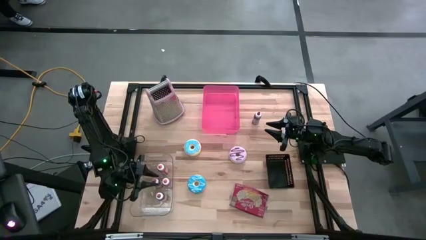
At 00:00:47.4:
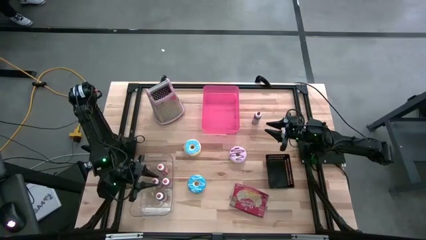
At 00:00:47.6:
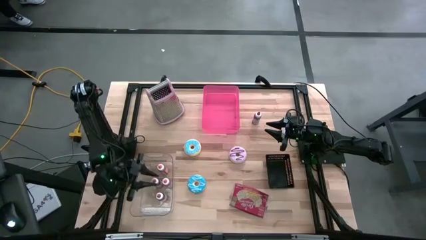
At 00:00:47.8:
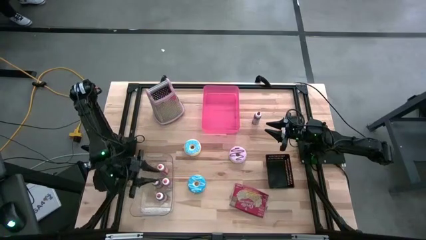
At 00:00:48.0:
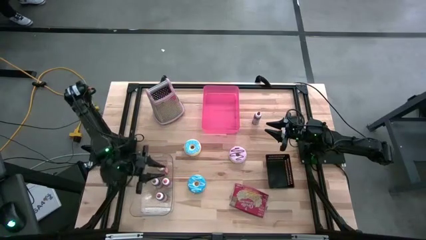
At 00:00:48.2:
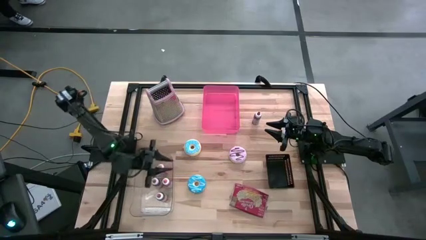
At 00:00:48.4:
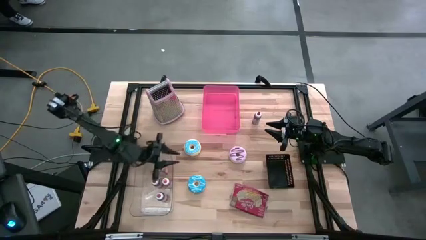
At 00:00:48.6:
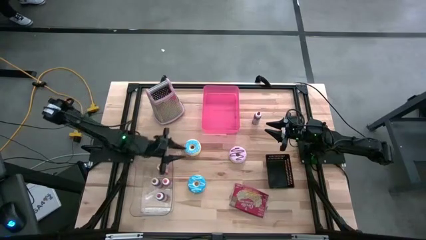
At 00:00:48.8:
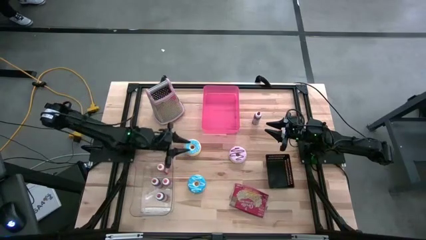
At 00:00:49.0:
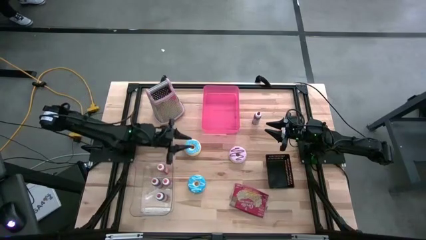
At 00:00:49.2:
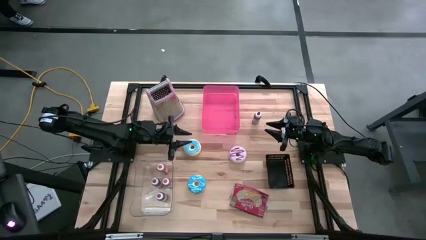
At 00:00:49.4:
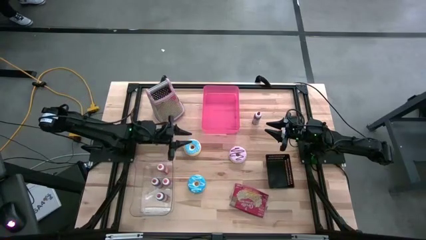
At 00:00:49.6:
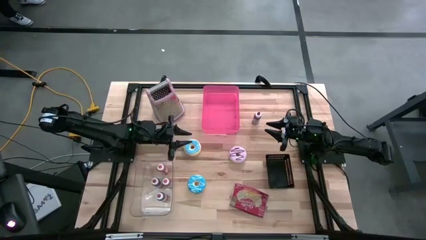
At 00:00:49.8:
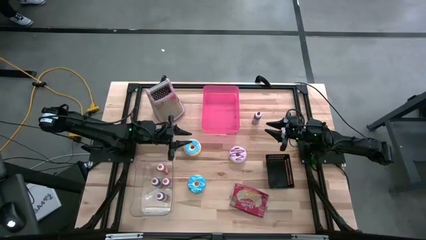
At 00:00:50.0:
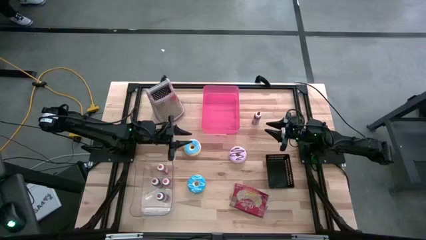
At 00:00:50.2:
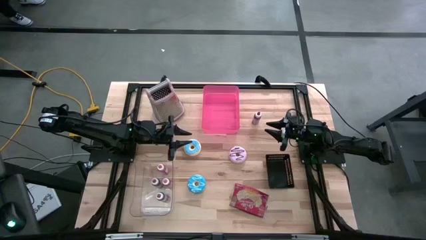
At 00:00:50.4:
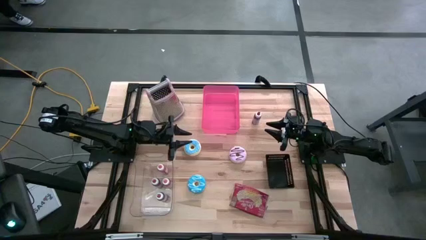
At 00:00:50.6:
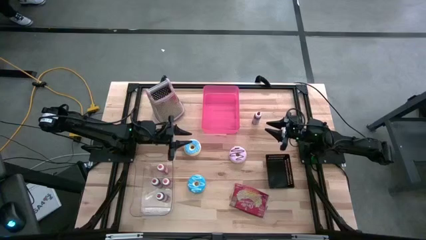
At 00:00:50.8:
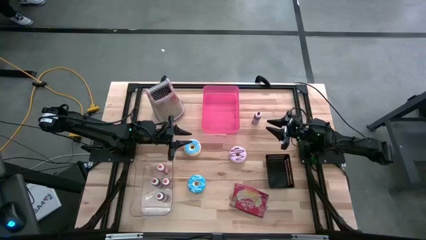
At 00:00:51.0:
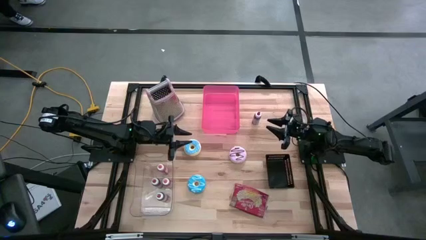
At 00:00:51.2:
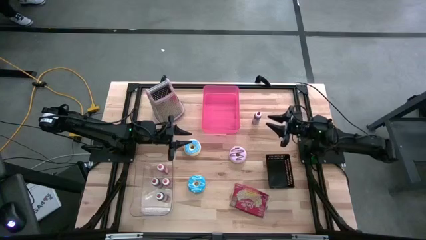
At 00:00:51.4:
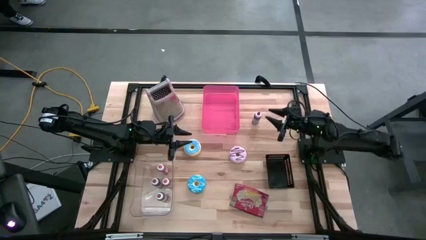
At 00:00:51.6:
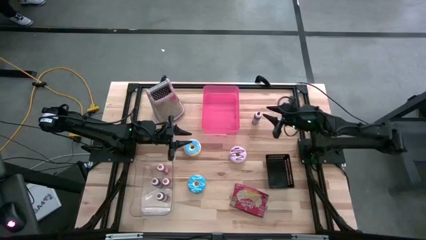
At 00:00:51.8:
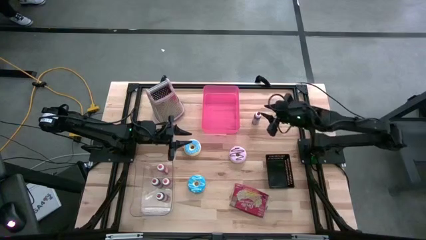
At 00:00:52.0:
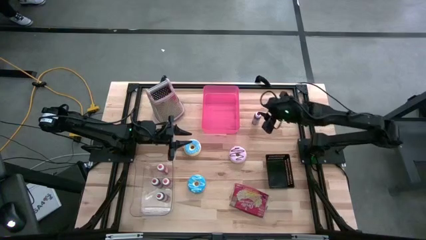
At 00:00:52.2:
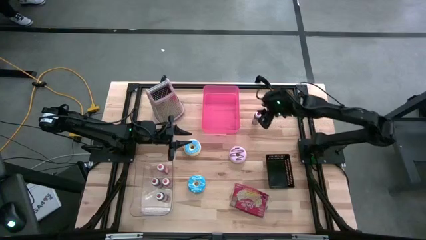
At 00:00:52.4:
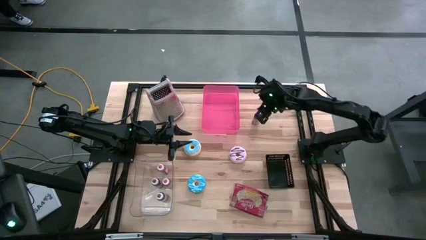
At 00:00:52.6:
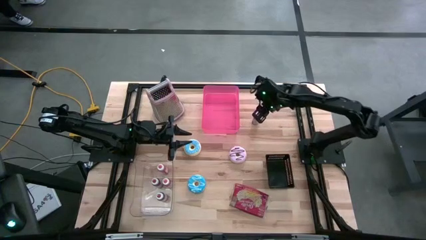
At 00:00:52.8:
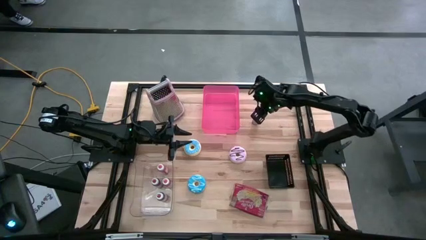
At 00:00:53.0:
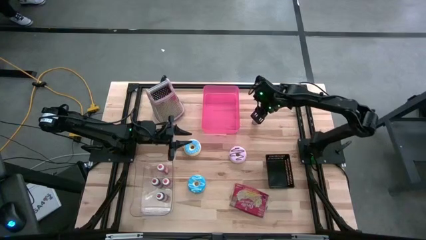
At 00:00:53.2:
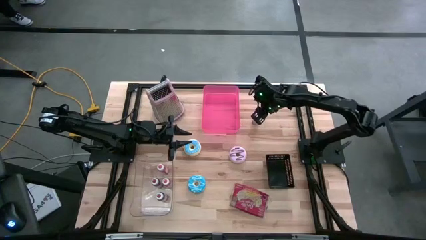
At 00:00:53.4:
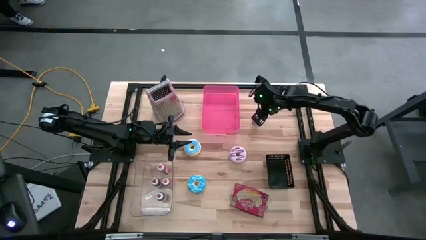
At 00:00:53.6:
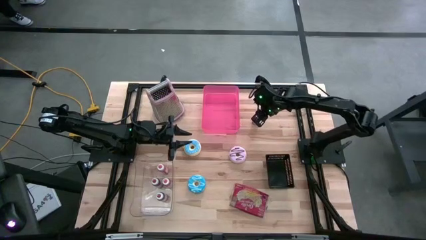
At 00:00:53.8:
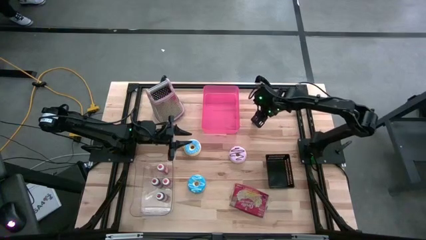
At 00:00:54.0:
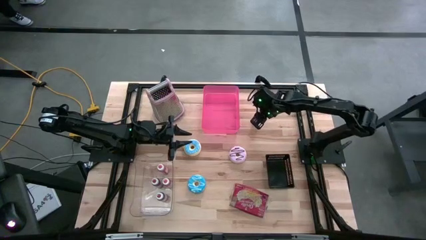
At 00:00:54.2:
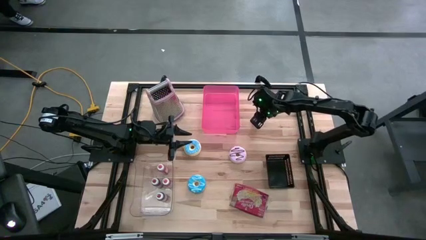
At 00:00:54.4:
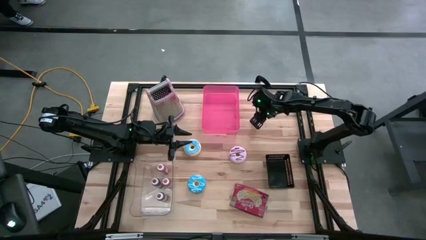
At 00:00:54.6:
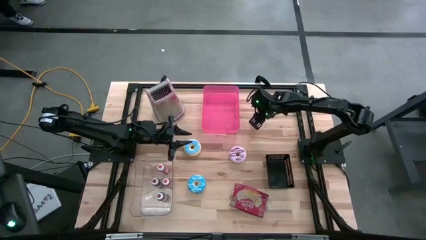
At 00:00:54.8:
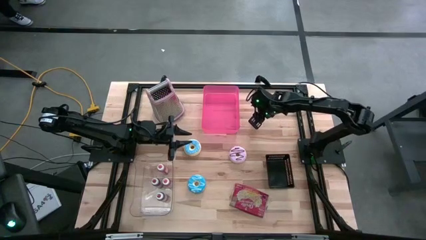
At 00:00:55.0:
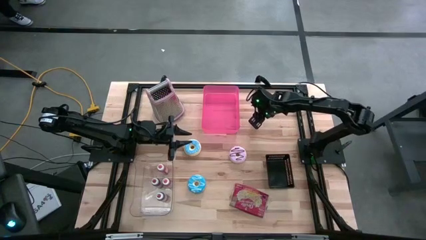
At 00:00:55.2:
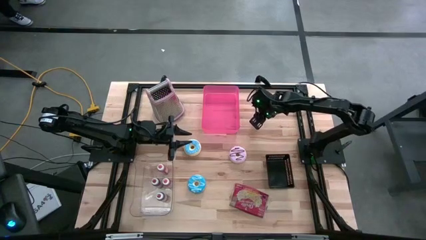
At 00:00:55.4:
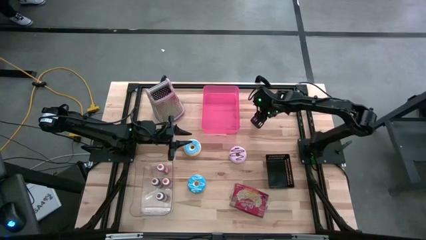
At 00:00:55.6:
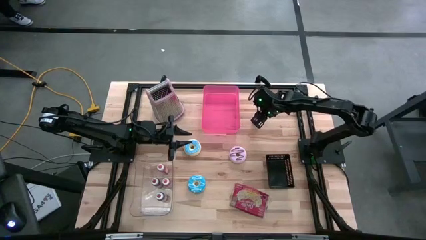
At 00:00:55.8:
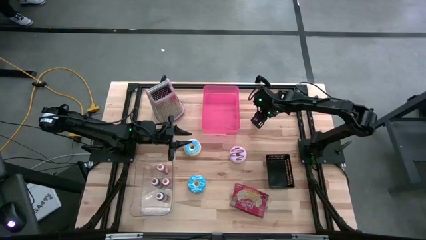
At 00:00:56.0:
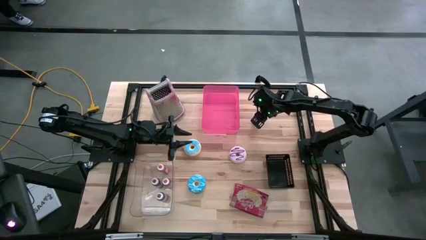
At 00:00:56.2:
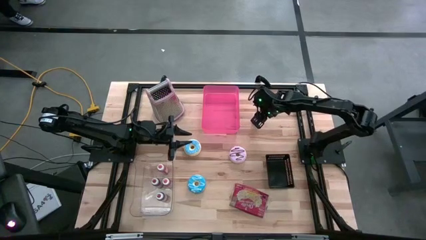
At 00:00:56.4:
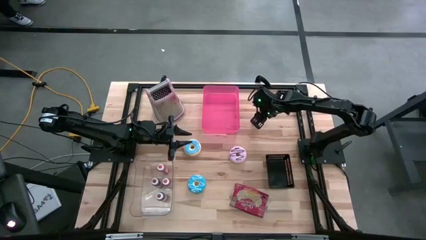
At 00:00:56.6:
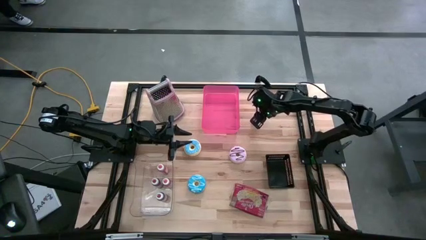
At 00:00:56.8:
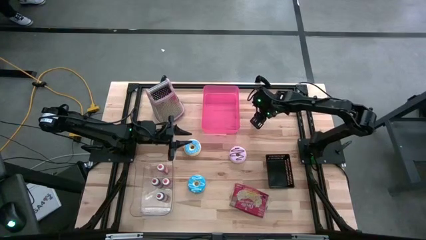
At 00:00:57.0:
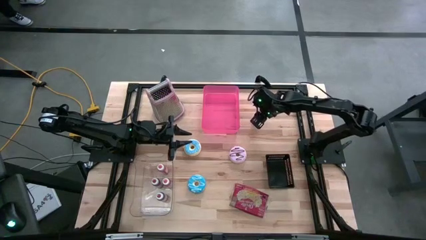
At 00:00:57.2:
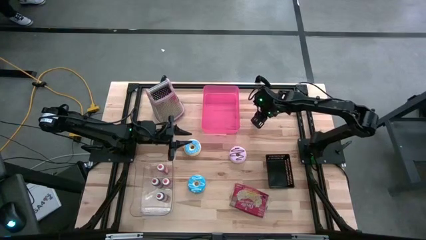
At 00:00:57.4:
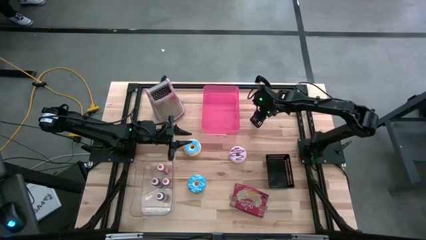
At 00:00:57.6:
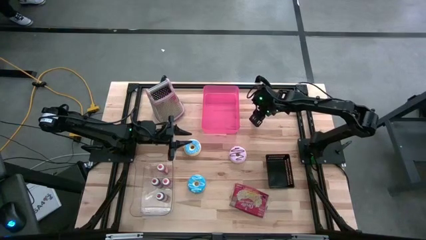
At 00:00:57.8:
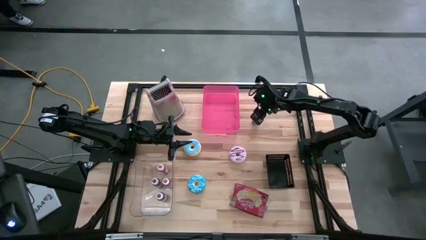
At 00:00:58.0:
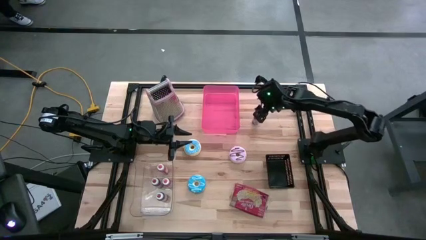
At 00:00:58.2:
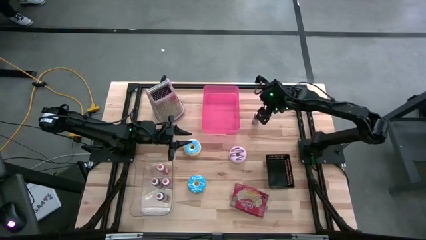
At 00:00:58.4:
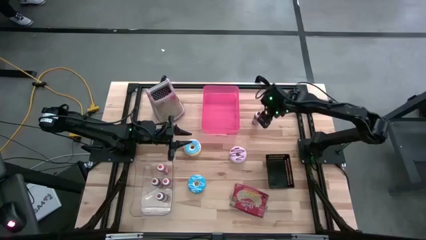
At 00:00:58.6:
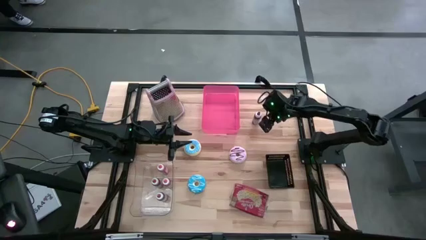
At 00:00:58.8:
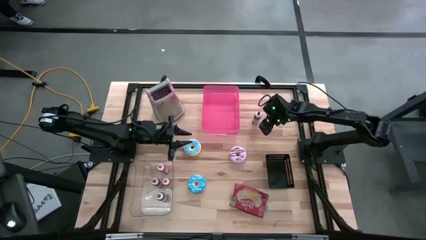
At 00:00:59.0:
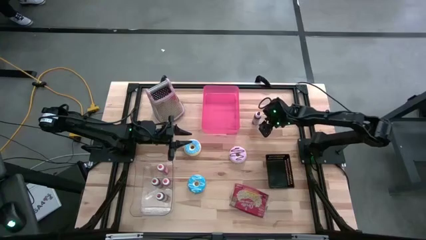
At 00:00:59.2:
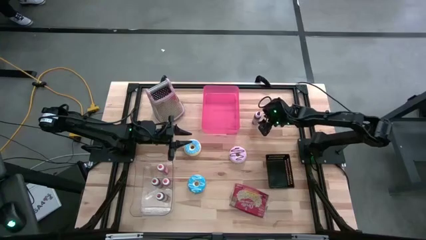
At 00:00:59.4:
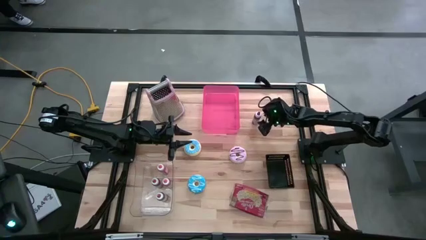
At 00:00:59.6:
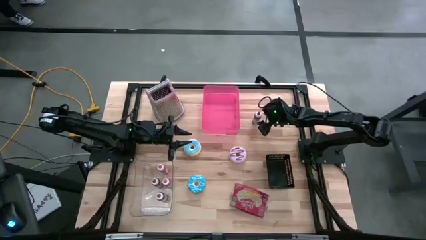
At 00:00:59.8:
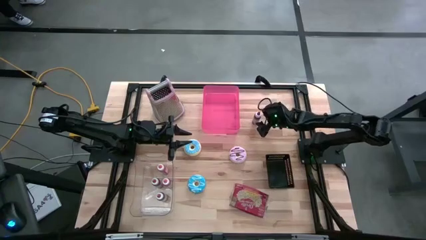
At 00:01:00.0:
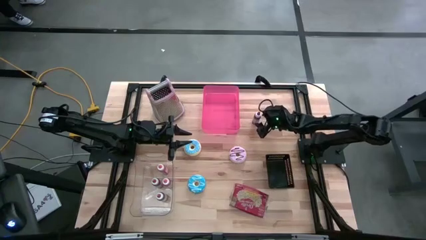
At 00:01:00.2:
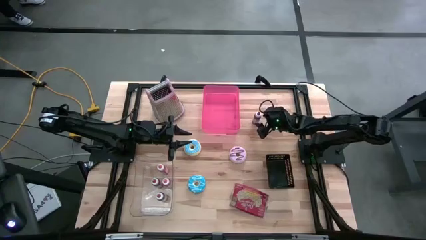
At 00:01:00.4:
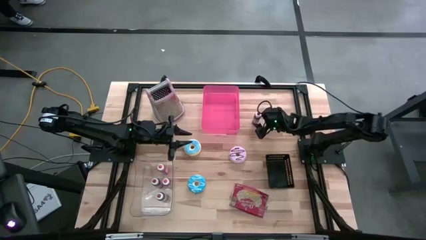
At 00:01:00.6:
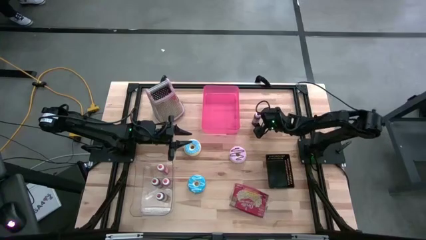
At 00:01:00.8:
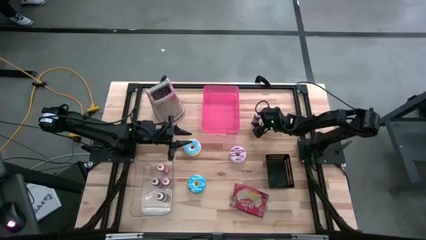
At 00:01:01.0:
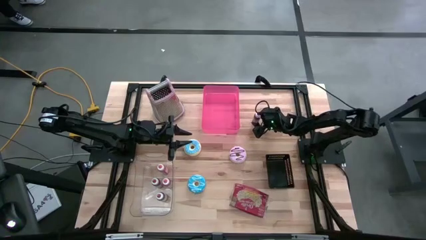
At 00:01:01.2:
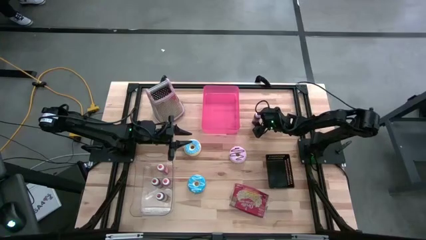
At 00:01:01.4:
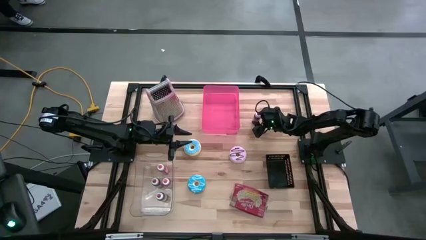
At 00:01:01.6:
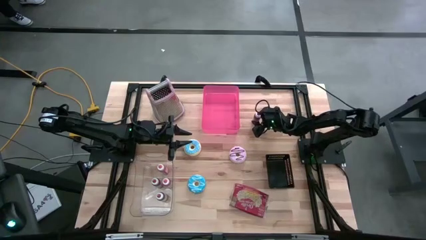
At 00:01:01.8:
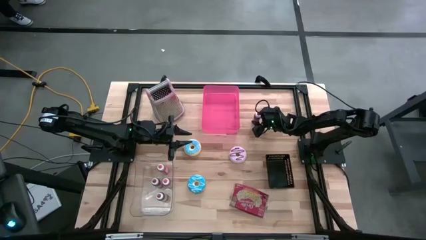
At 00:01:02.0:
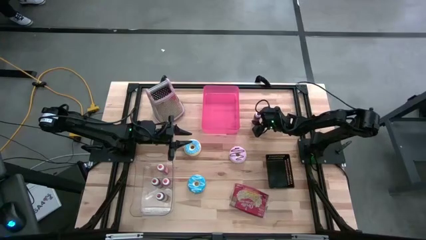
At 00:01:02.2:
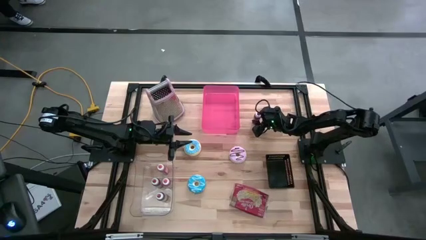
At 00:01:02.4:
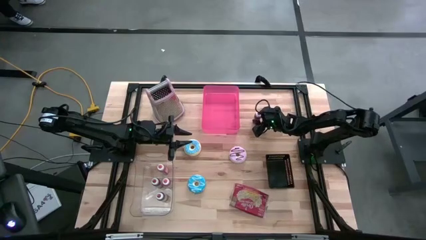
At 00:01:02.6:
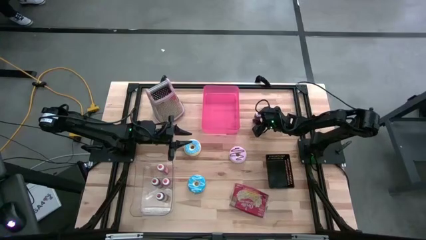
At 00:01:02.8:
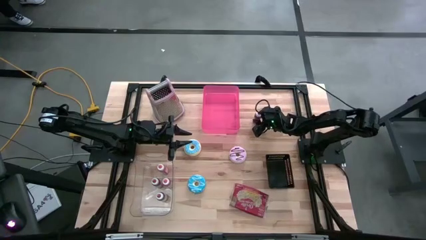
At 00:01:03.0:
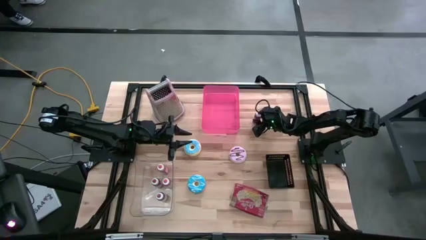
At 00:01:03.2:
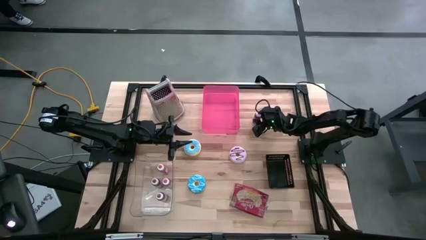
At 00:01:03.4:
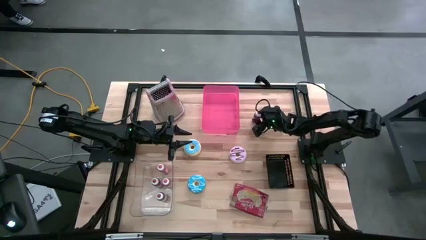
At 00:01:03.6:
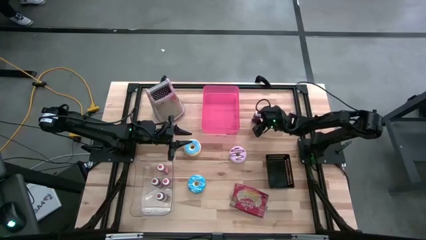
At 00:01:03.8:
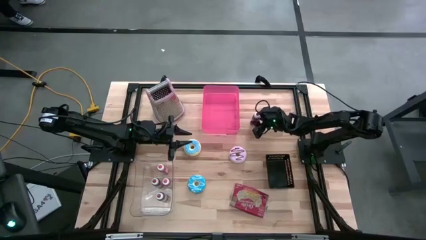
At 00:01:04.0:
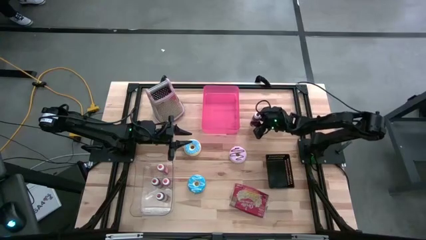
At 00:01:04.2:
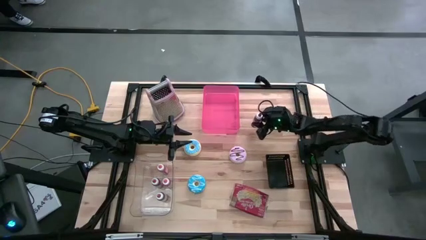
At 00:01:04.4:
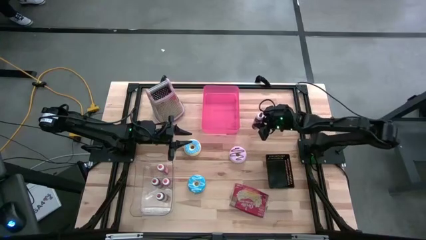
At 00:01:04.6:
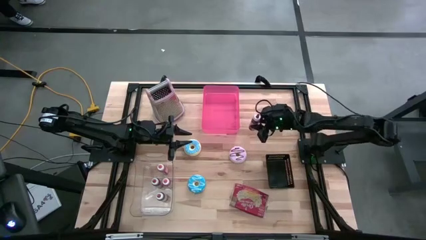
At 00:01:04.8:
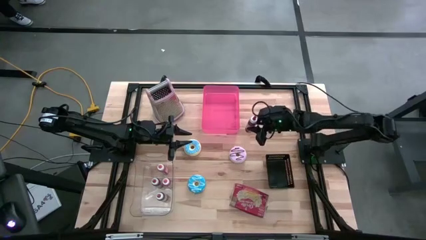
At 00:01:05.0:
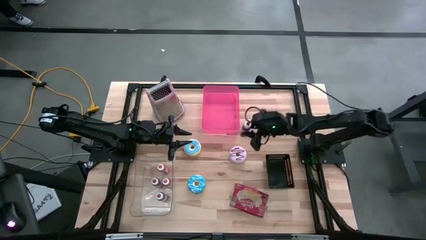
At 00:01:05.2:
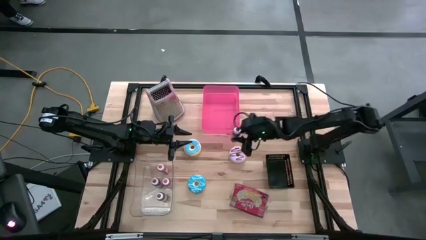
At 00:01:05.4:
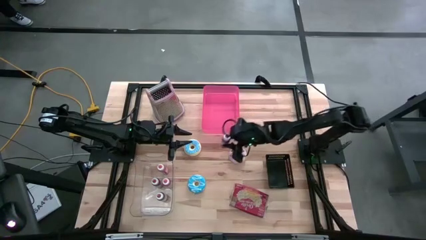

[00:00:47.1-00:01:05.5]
Put the red large food coloring bottle into the transparent bin
